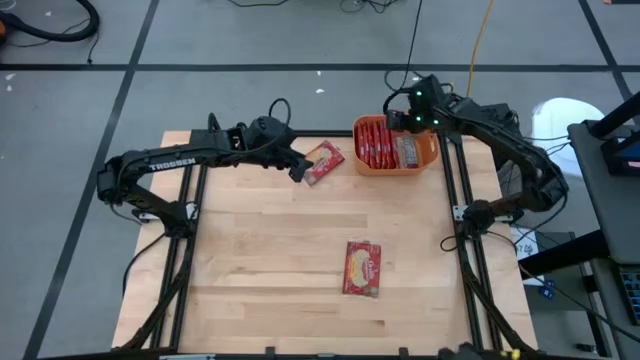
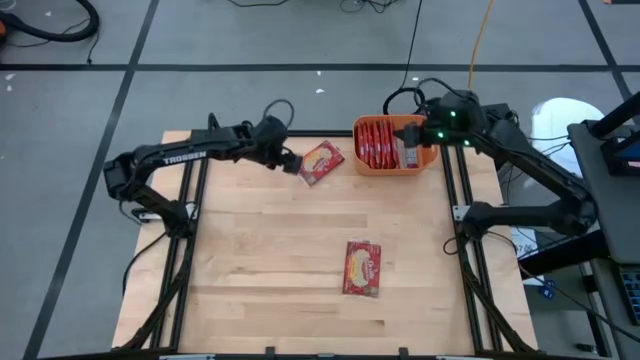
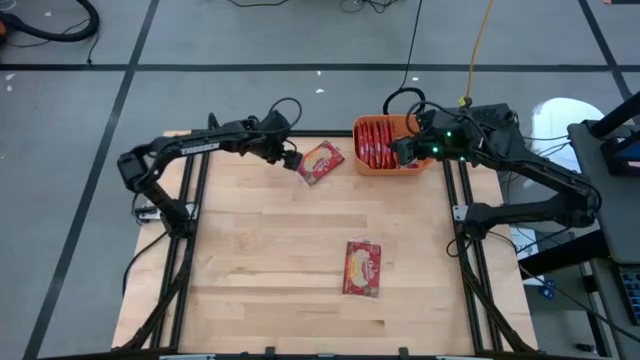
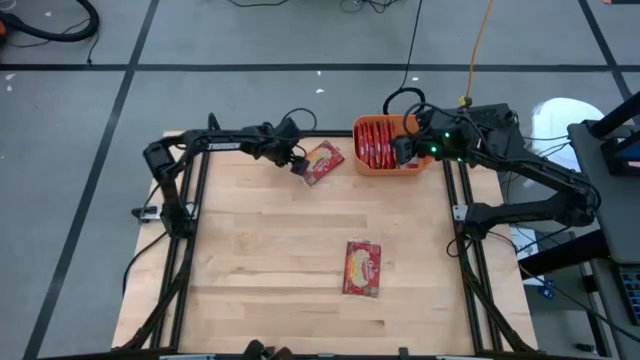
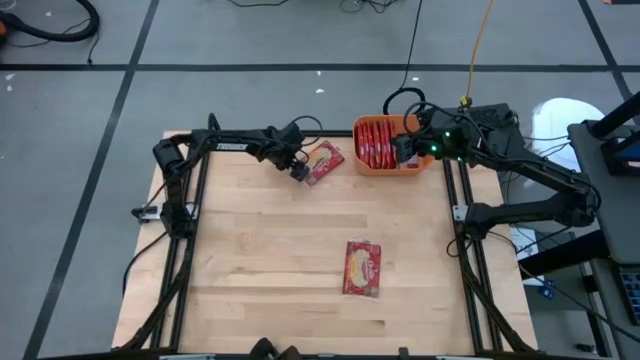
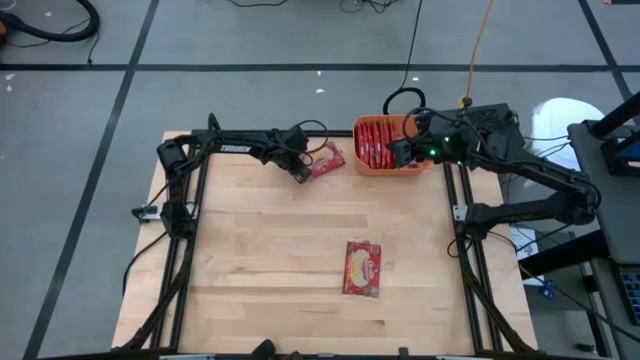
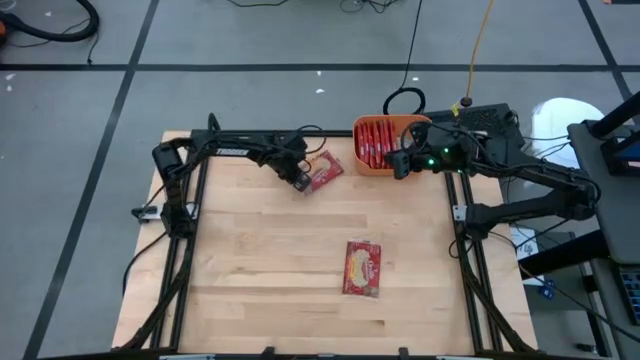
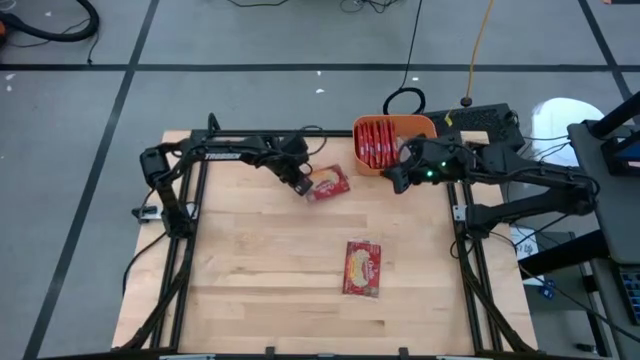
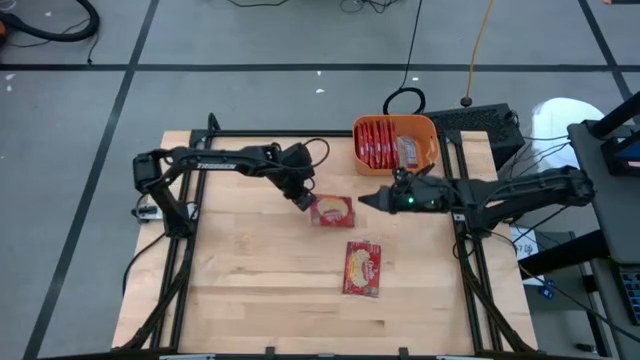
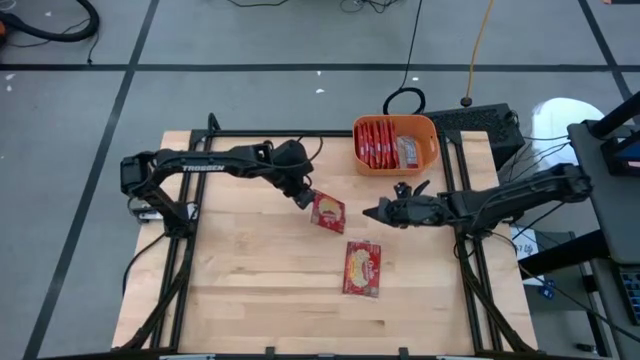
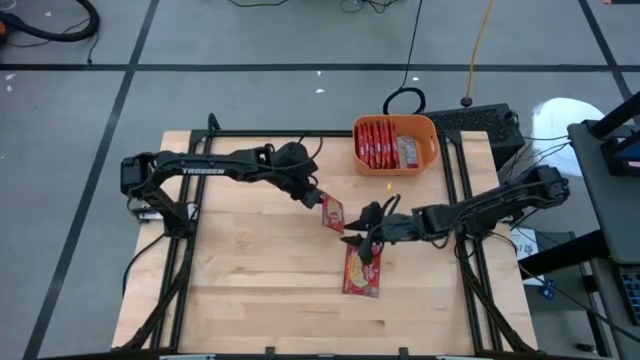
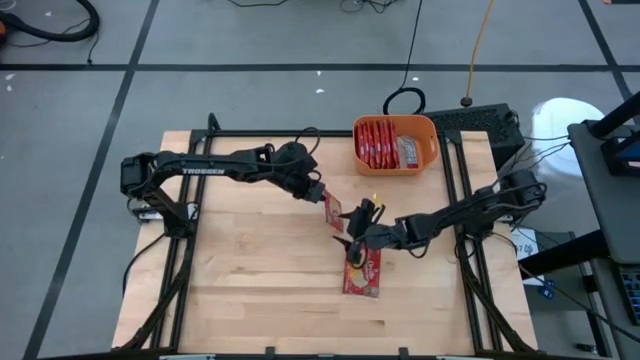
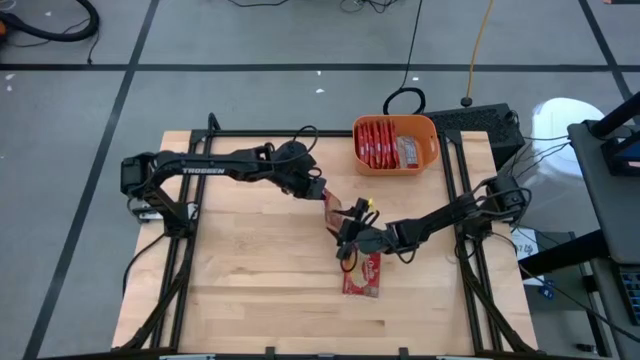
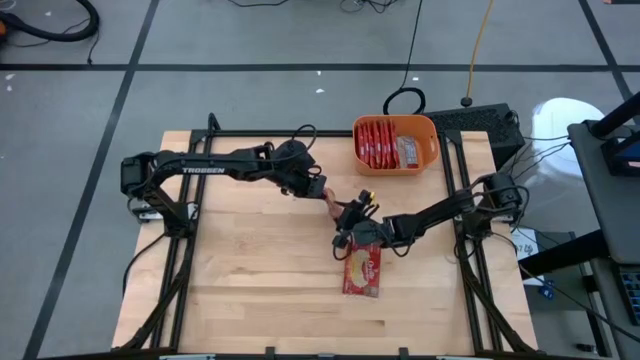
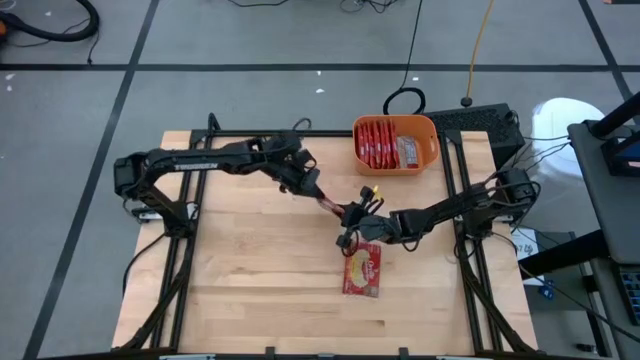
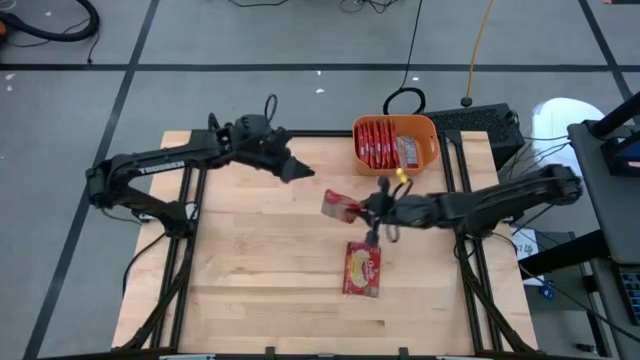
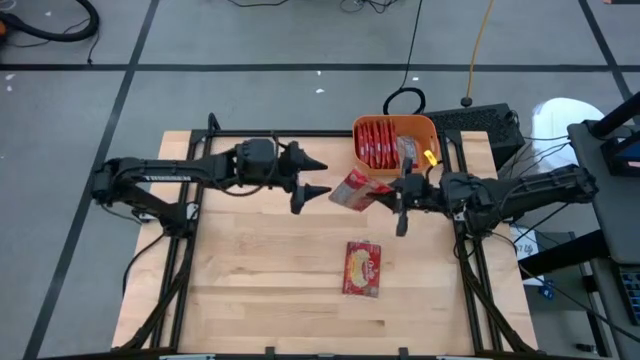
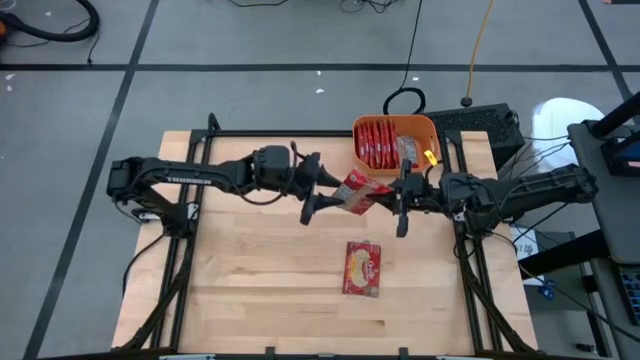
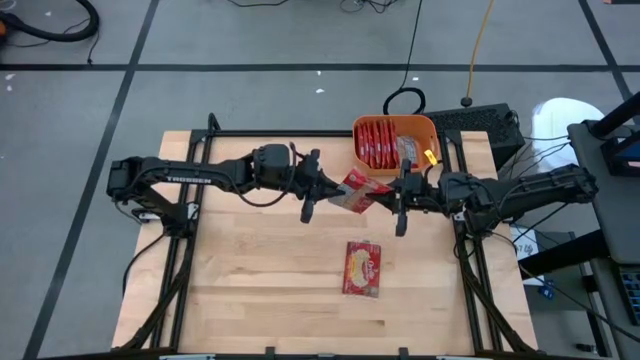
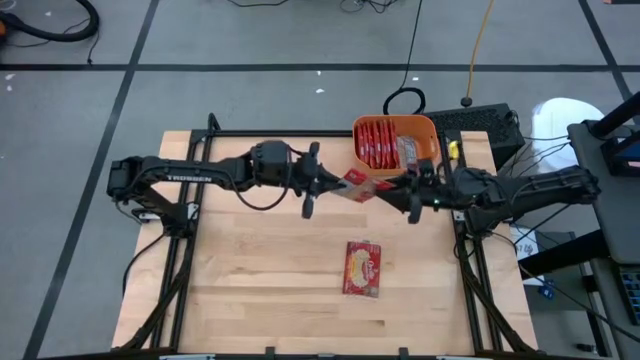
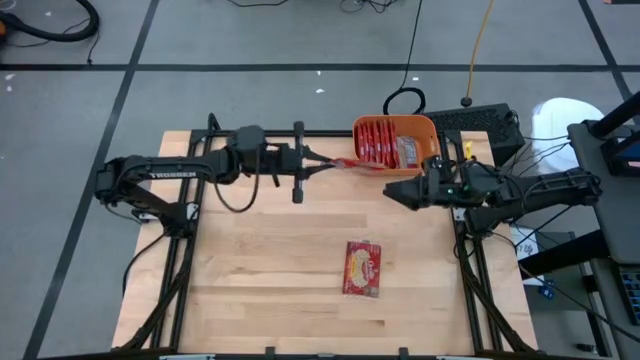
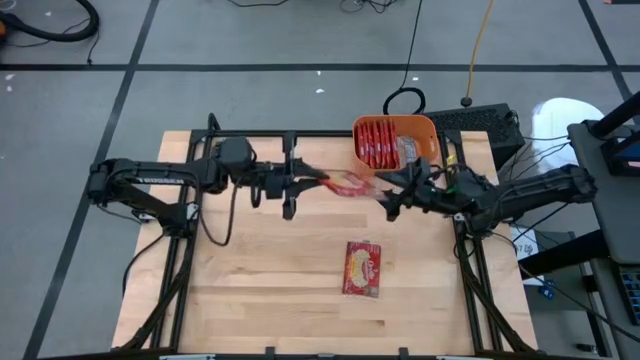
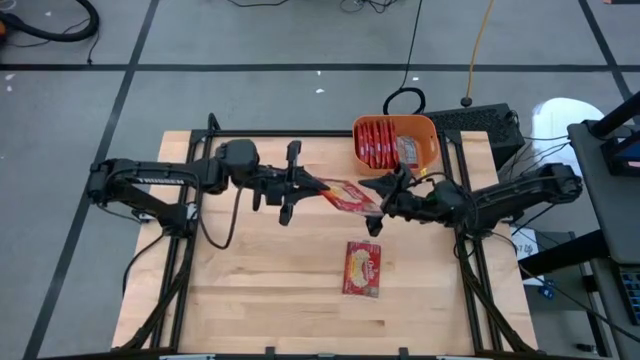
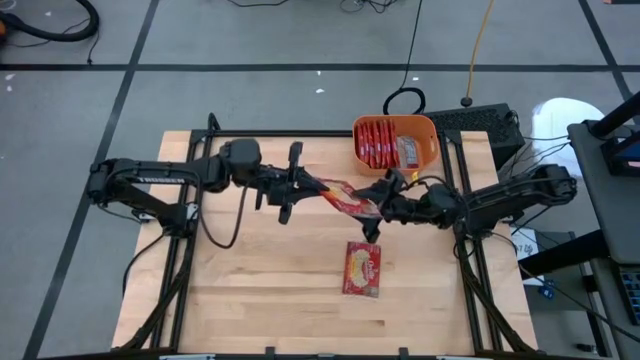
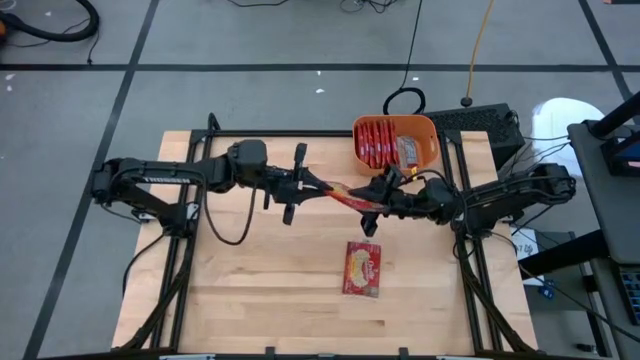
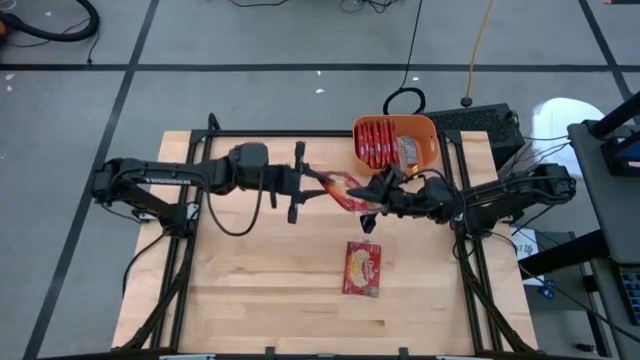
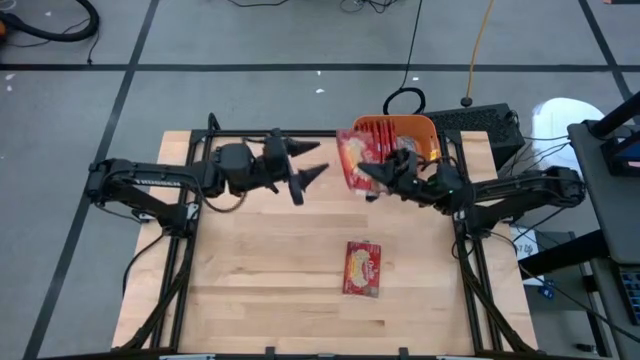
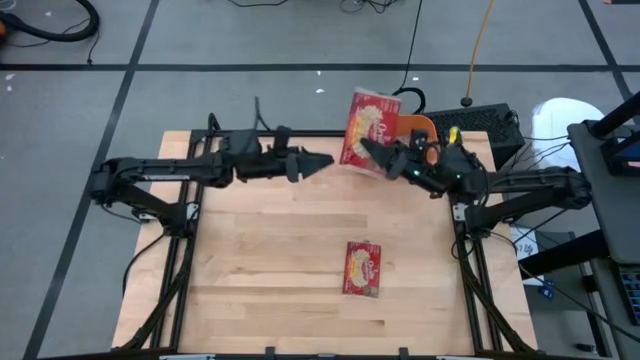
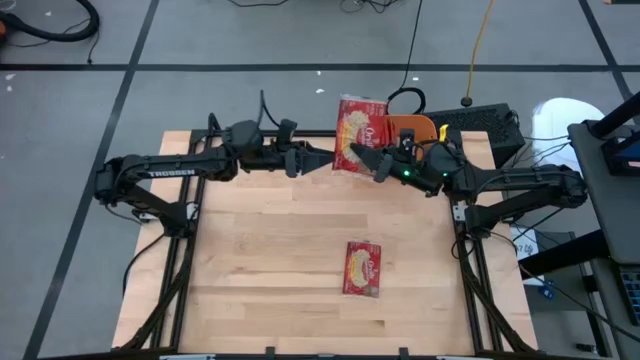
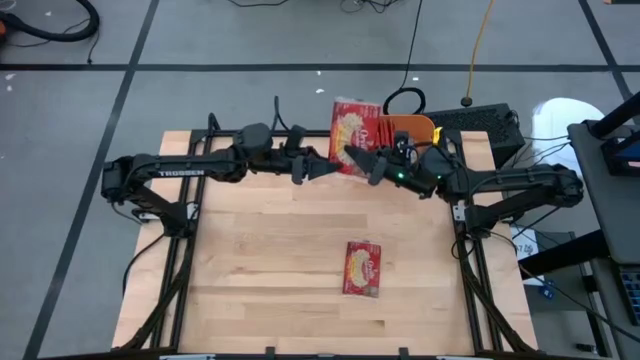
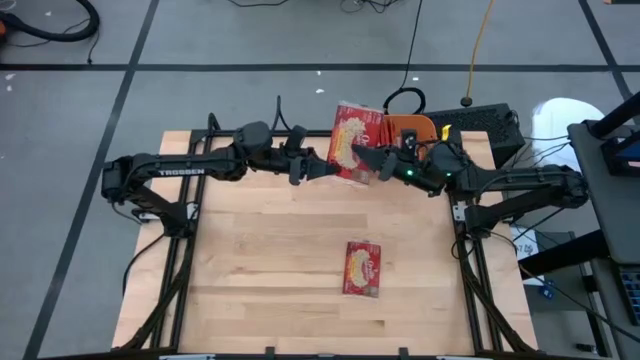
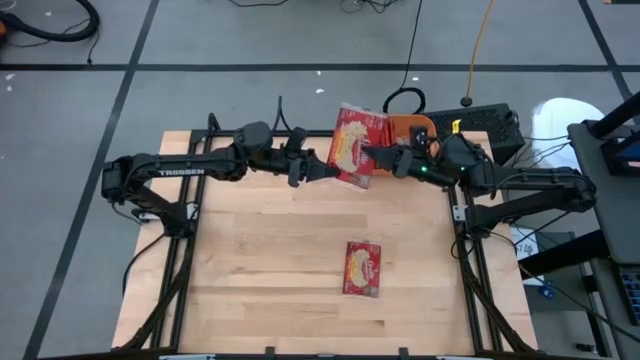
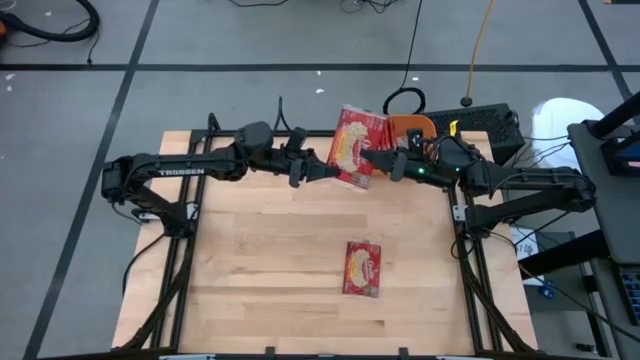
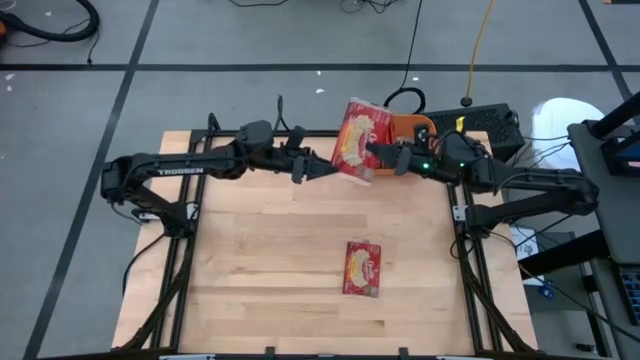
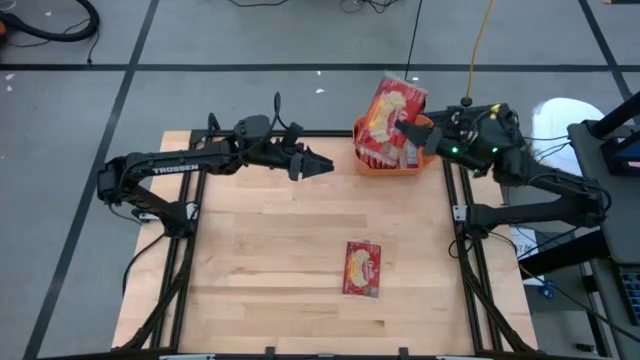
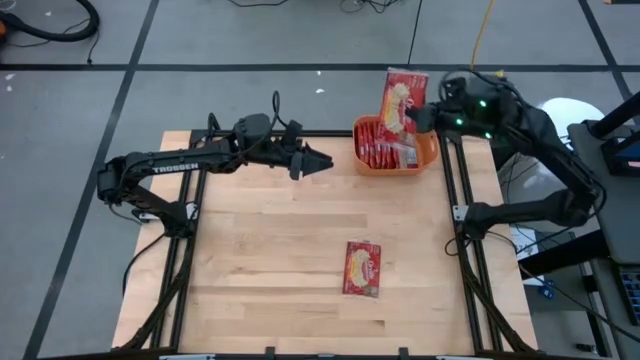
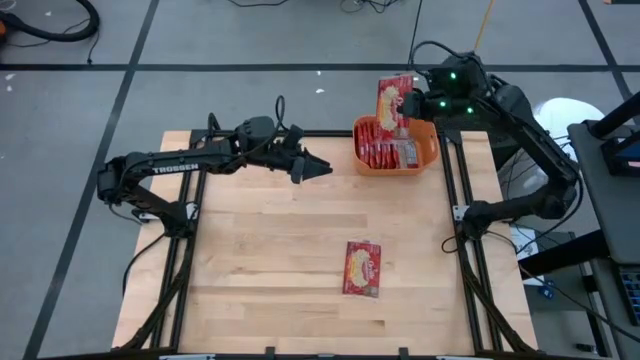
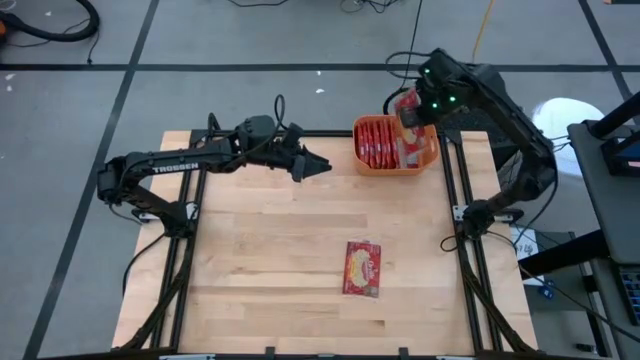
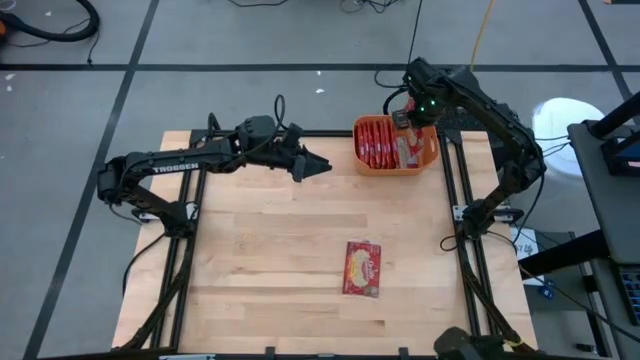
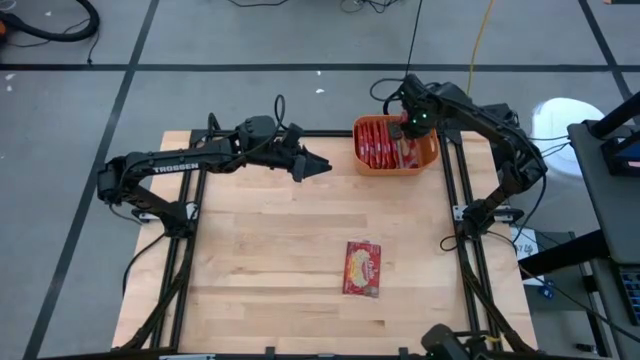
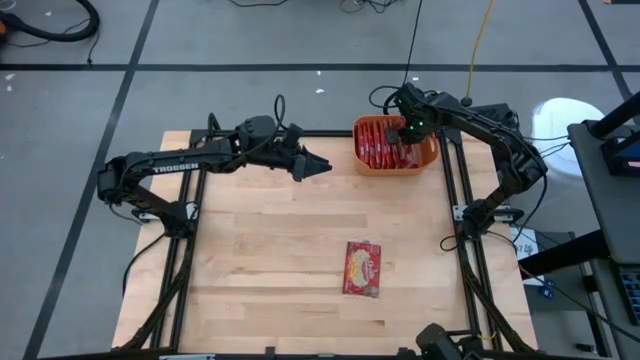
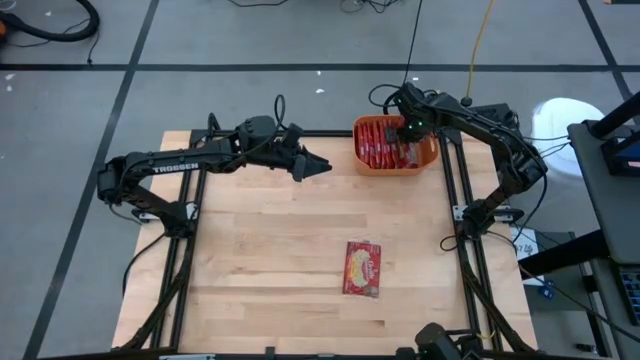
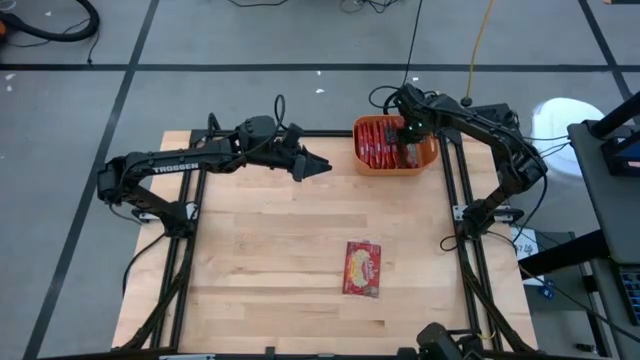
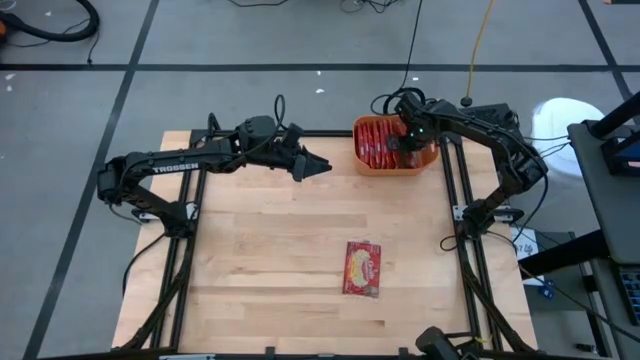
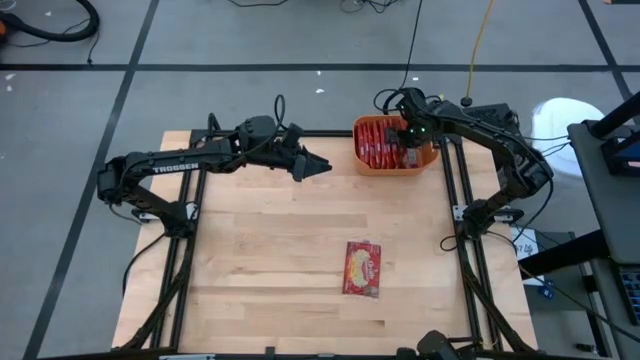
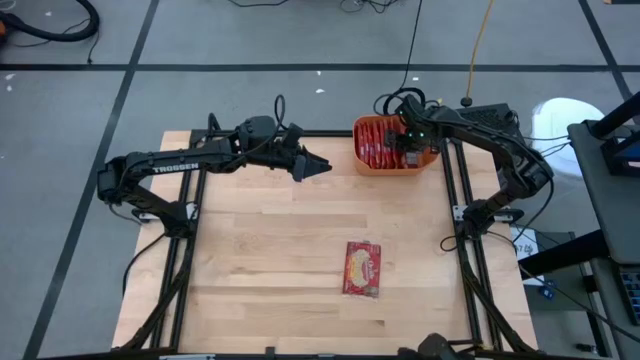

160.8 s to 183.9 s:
Task: Sort popcorn bags into baskets
Put the red popcorn bag into the orange bin
